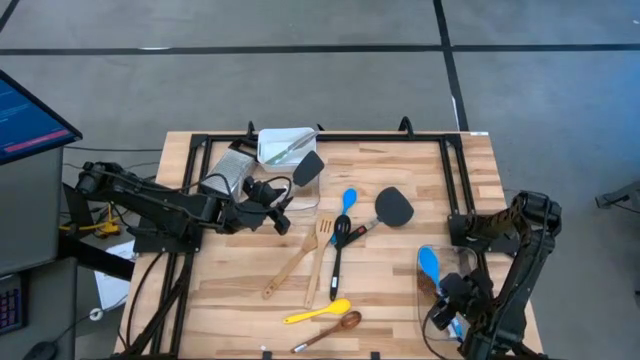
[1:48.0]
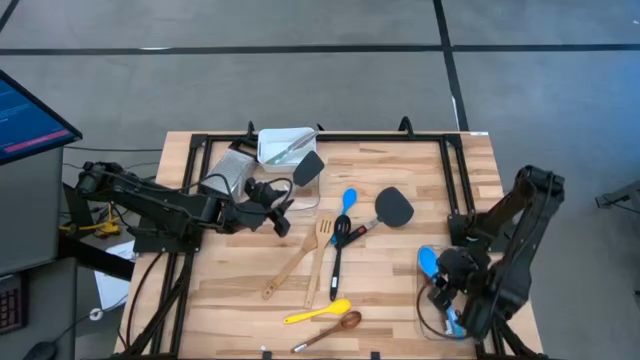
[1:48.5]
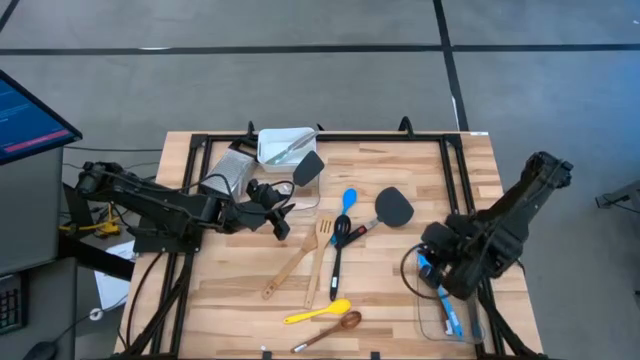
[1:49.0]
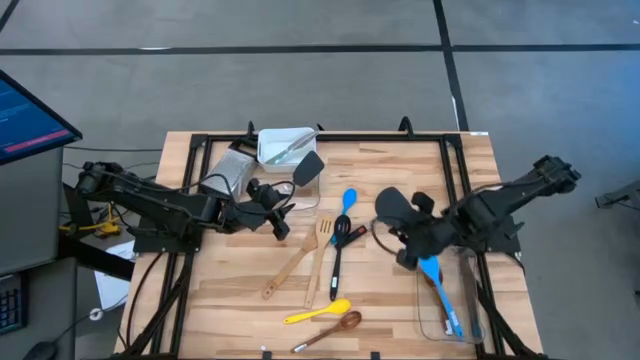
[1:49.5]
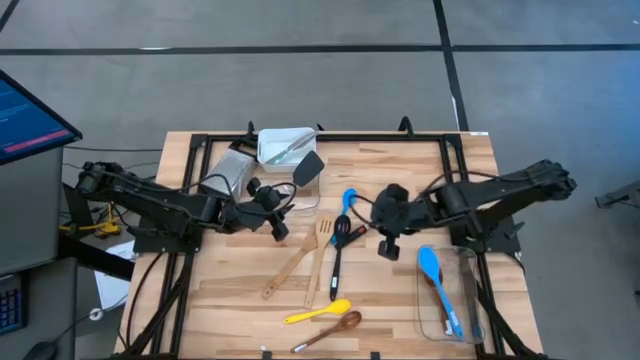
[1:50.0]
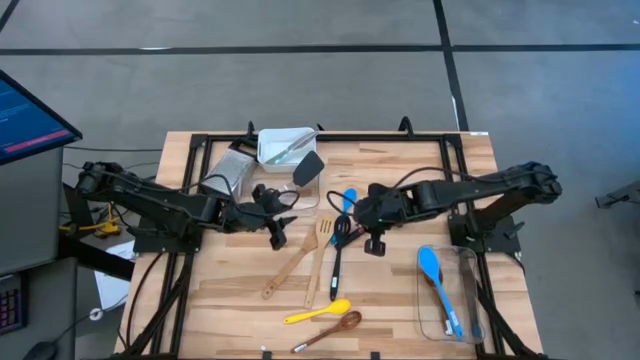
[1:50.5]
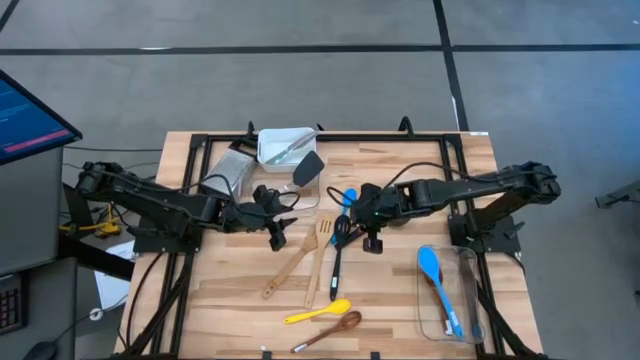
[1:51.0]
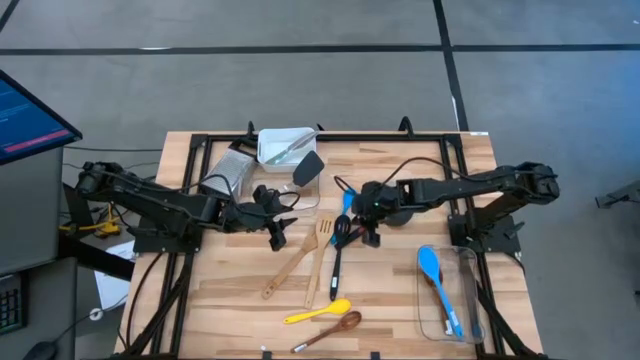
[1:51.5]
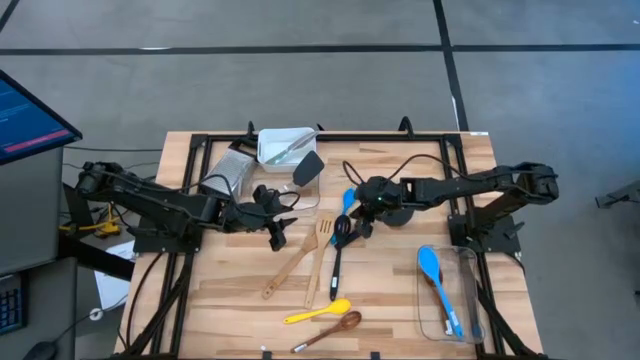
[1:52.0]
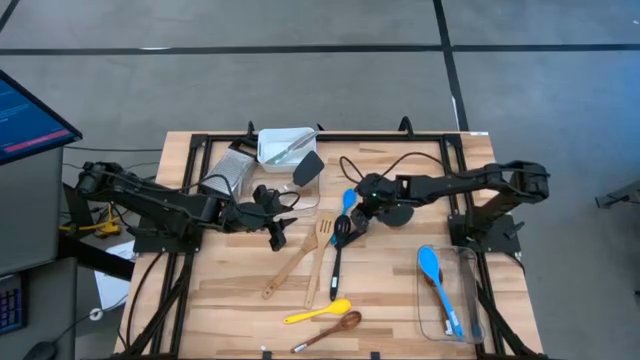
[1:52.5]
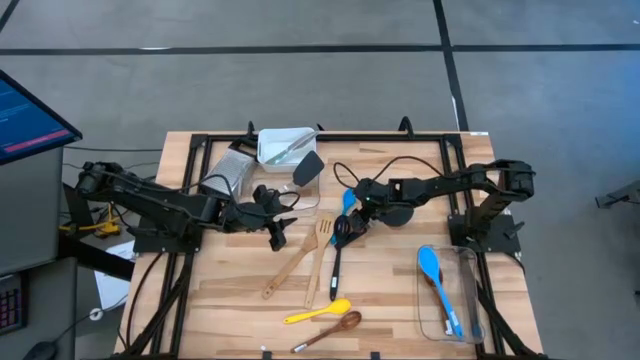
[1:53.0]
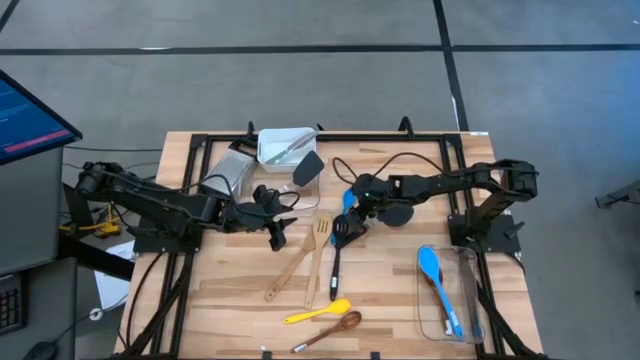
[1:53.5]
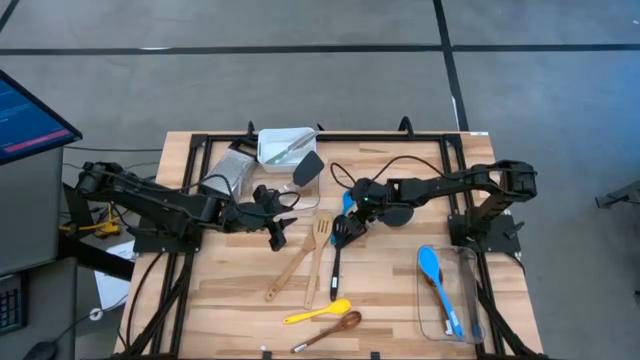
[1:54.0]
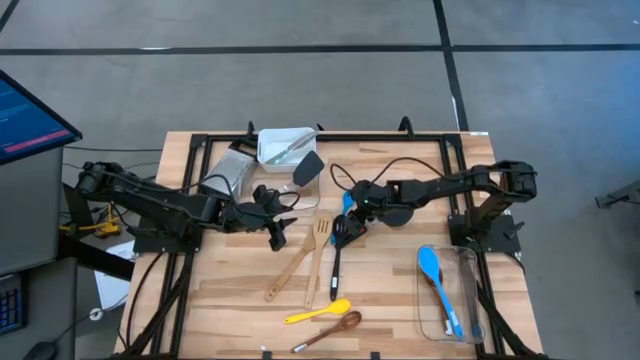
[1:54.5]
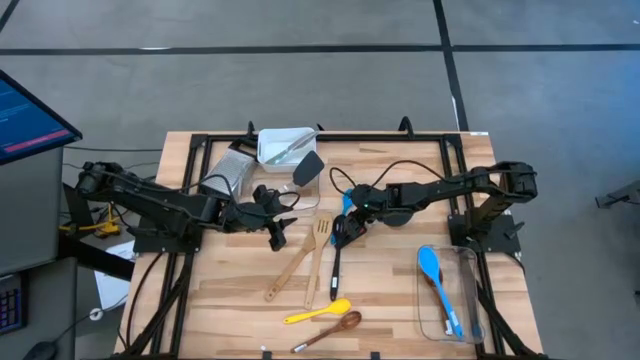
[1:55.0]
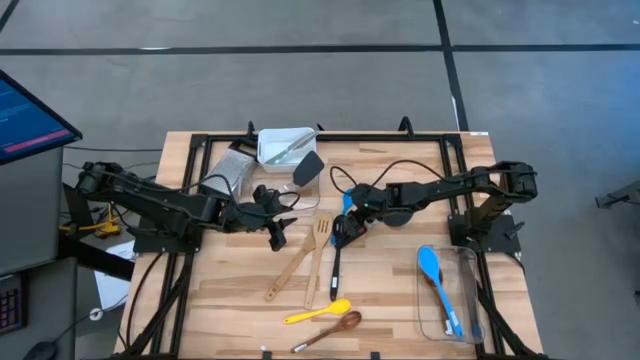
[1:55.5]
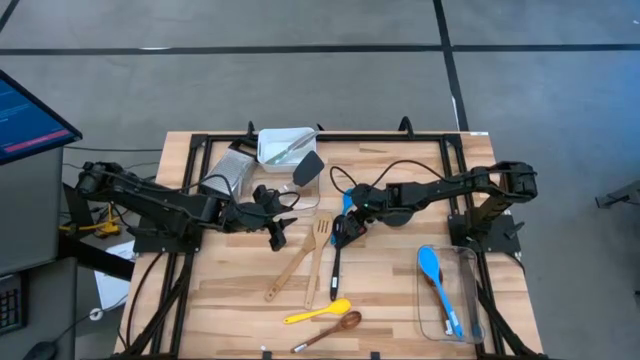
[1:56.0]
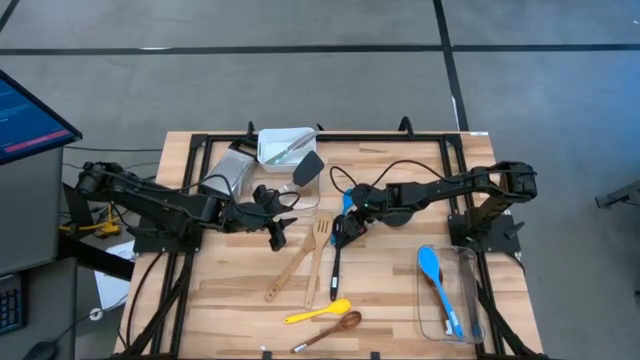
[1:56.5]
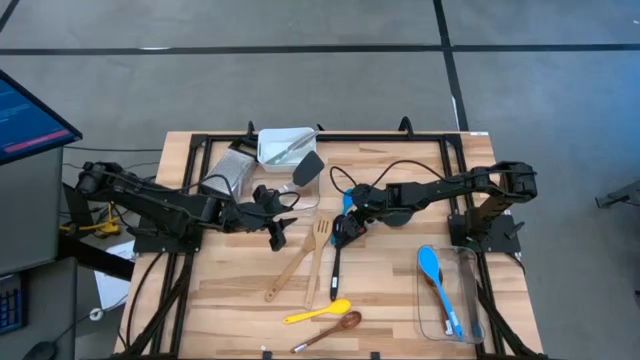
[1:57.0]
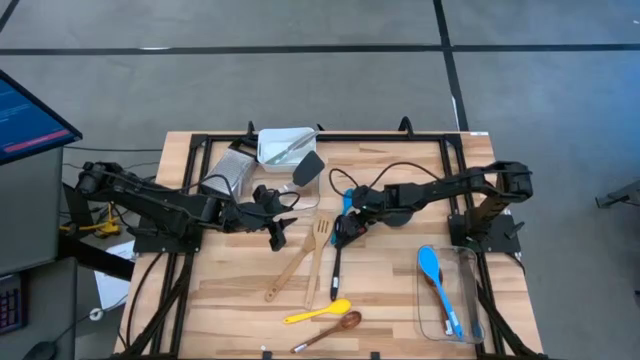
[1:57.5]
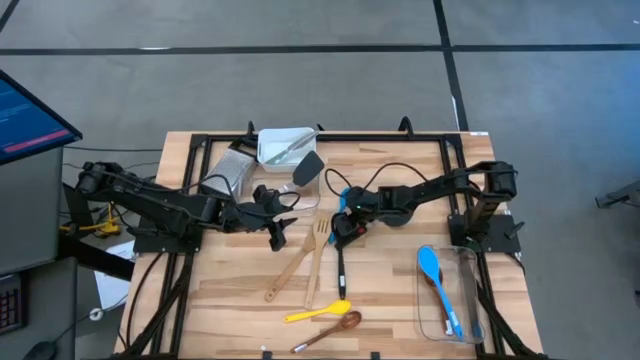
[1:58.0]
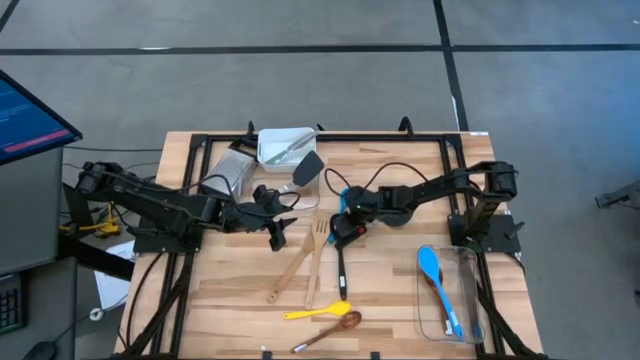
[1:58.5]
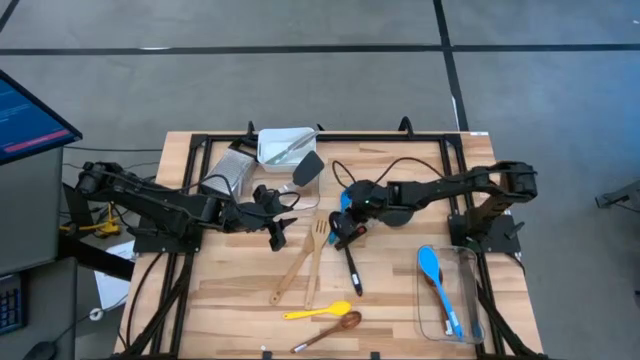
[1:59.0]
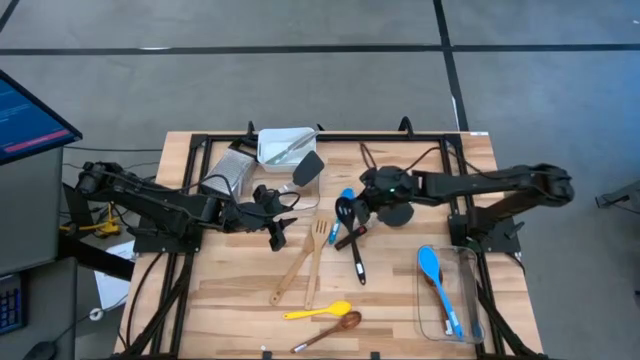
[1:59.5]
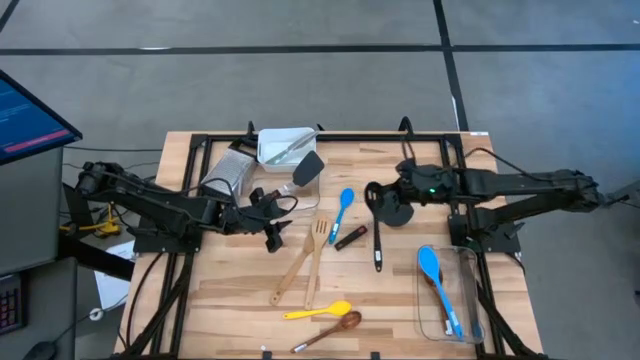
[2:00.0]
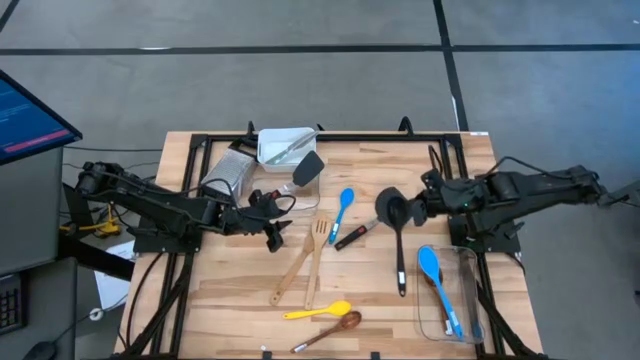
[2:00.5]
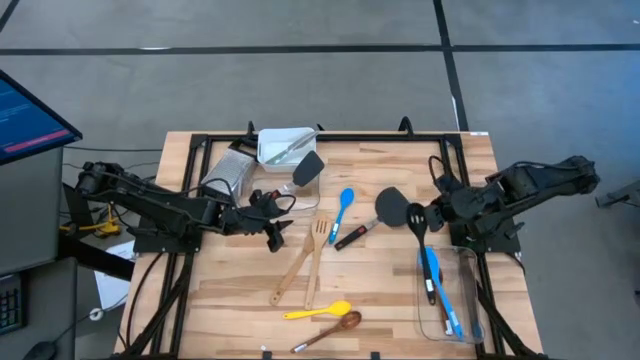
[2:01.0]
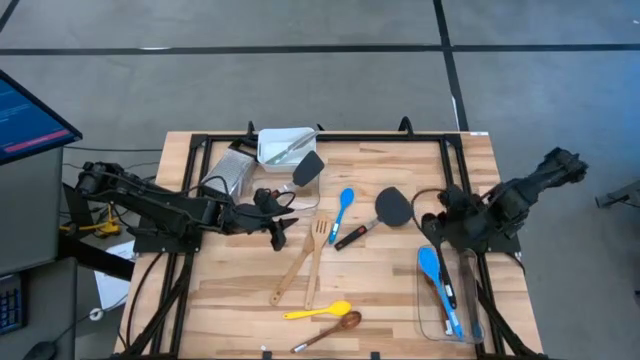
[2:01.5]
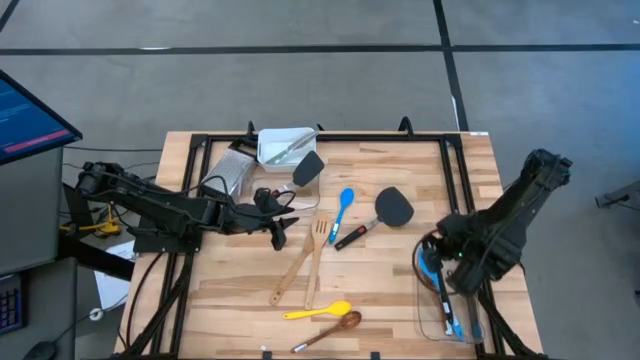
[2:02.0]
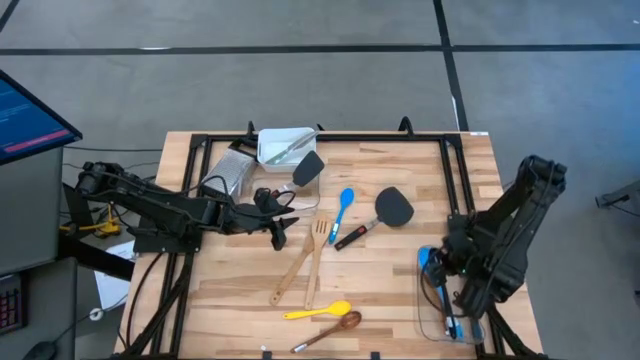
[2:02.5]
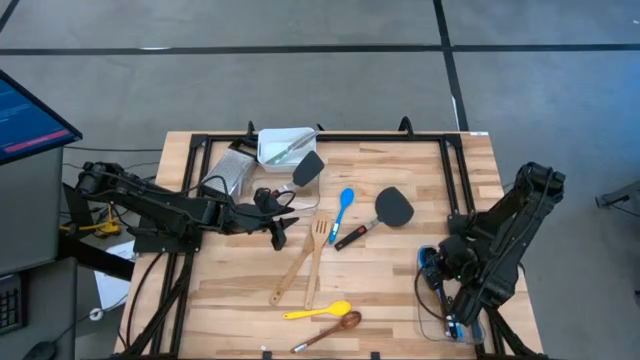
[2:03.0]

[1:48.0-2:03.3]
Task: Pick & Place Kitchen Items
Put the black slotted spatula into the bottom transparent bin

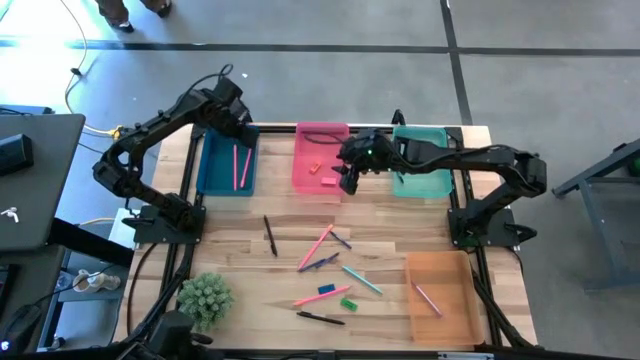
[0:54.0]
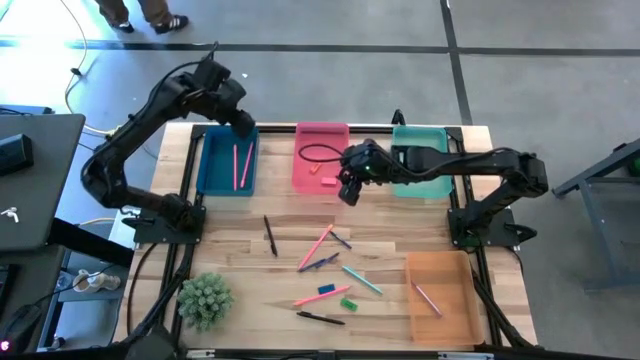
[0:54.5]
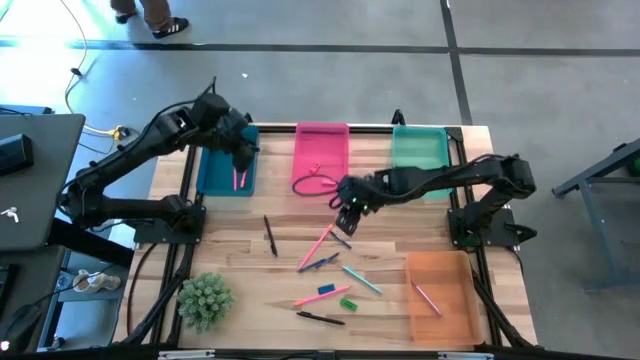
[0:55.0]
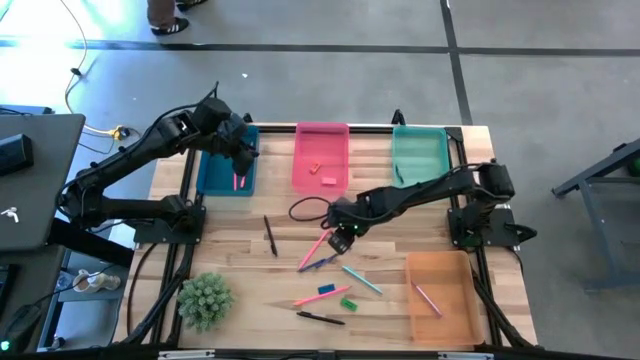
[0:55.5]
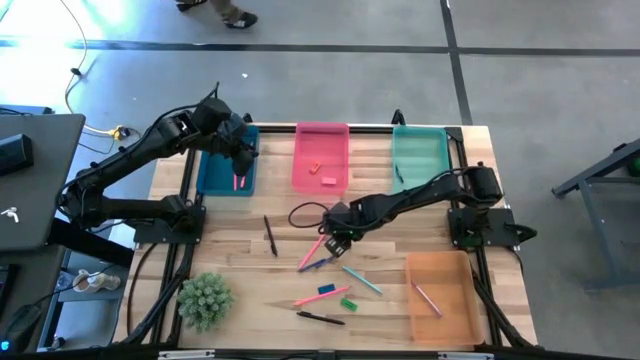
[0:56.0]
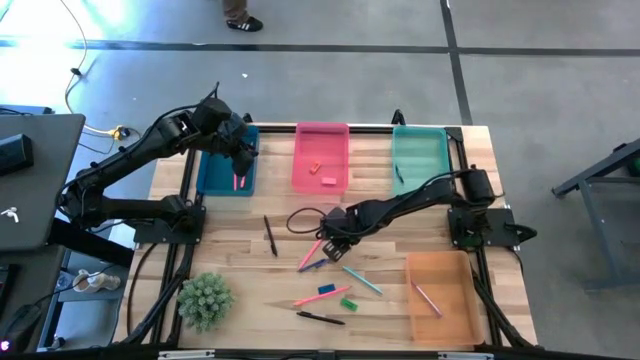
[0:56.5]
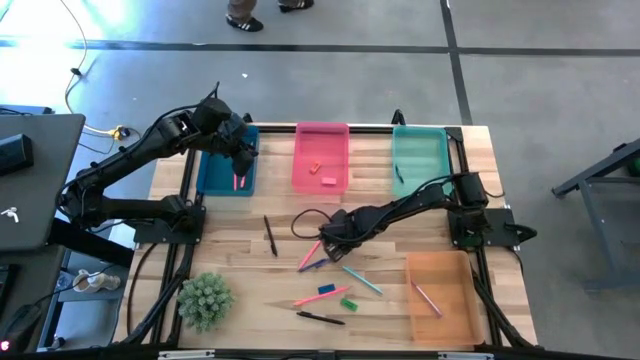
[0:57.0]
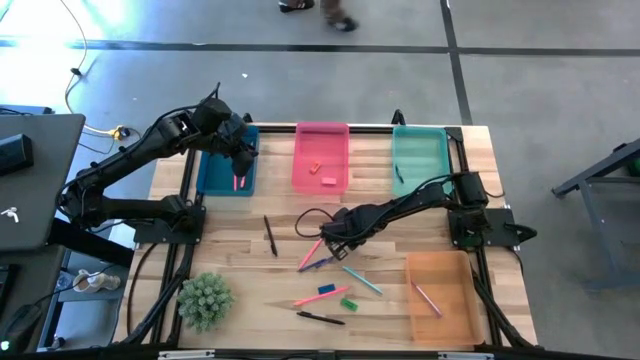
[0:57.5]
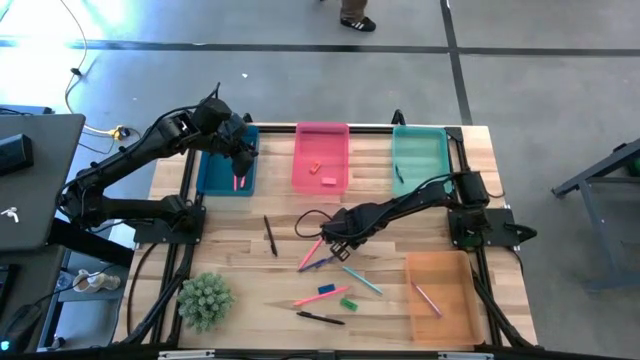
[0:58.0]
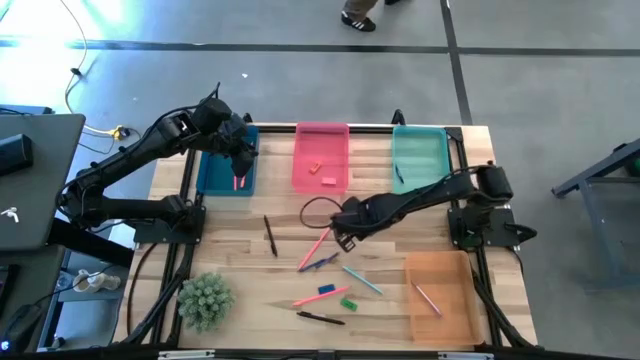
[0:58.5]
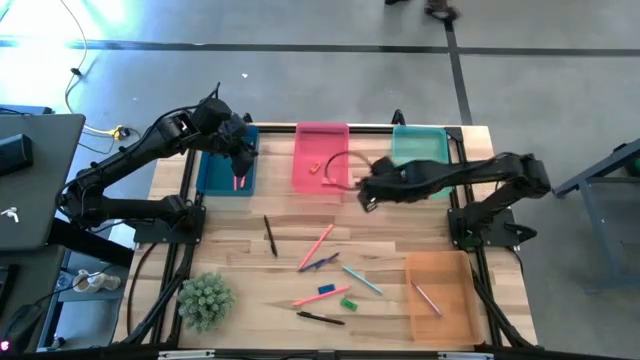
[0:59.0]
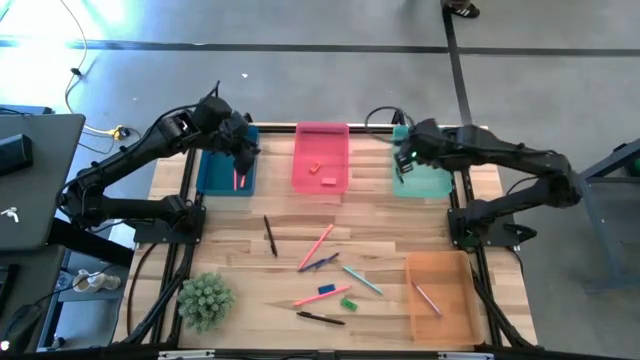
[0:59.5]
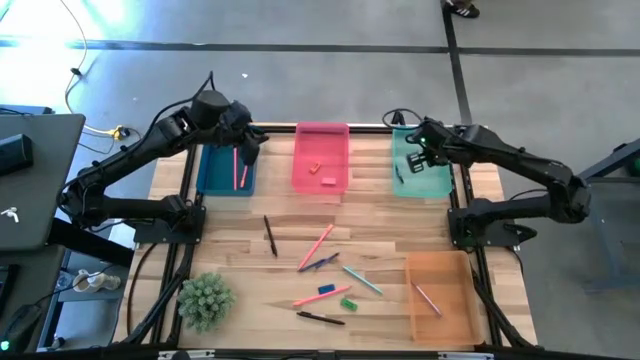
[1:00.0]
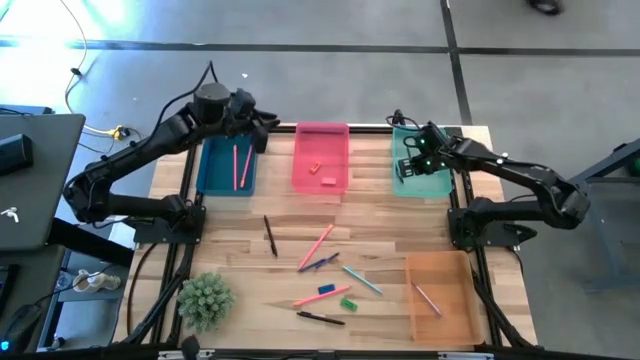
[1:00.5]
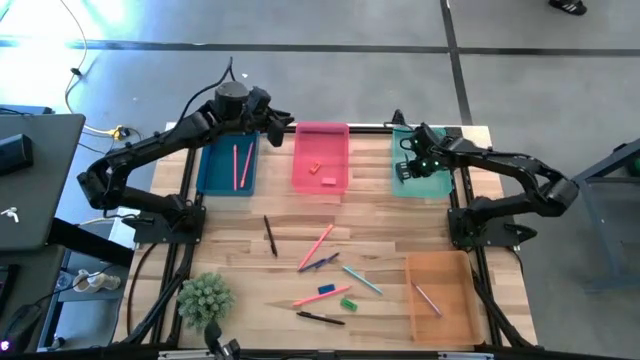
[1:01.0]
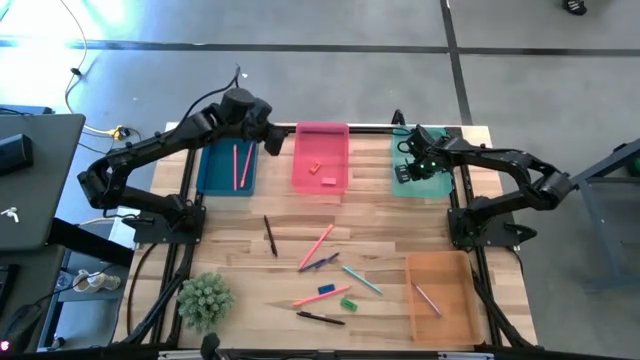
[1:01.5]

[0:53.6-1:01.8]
Task: Sort crayons/erasers/pens/pencils in bins
Put the blue crayon into the green bin
